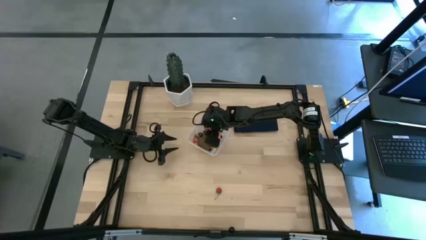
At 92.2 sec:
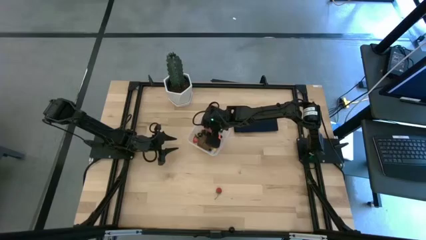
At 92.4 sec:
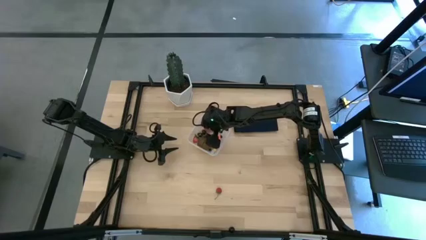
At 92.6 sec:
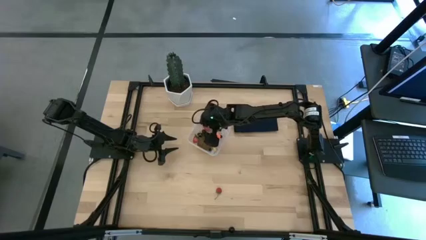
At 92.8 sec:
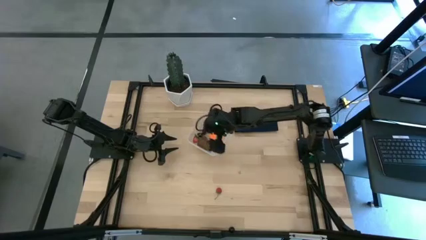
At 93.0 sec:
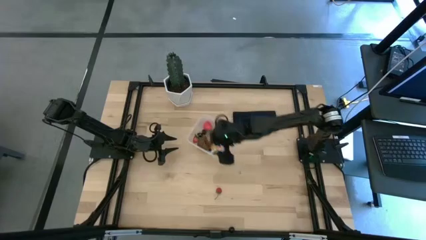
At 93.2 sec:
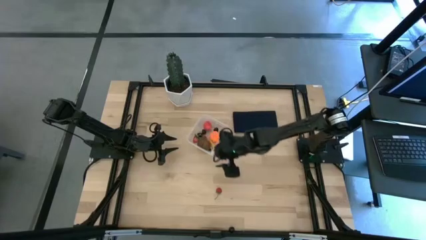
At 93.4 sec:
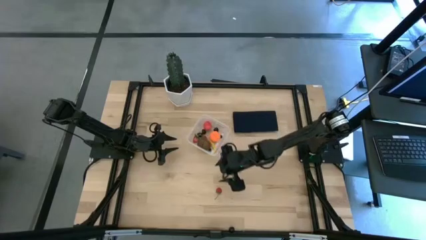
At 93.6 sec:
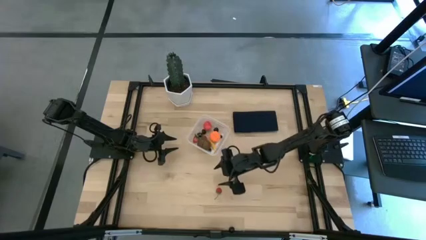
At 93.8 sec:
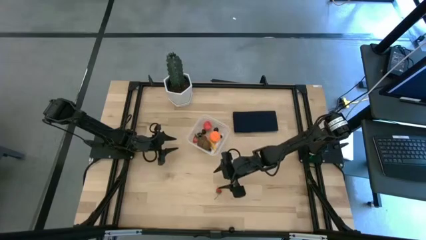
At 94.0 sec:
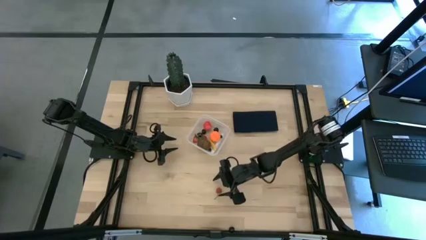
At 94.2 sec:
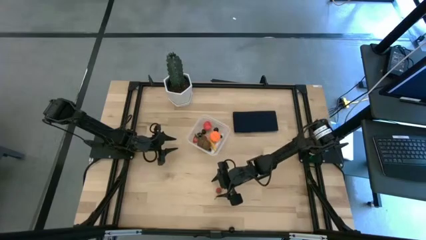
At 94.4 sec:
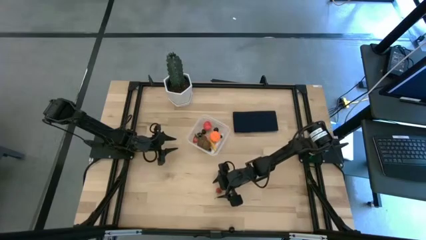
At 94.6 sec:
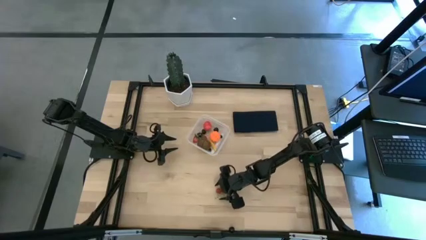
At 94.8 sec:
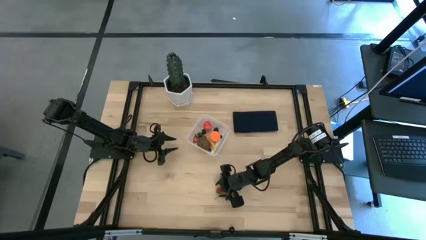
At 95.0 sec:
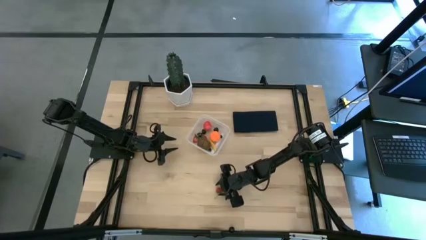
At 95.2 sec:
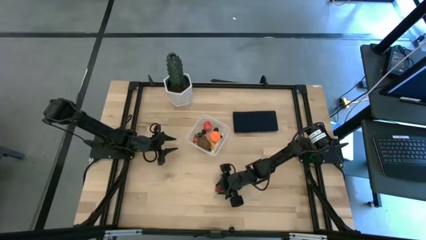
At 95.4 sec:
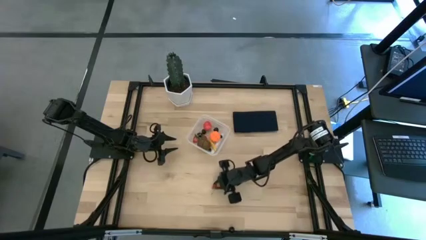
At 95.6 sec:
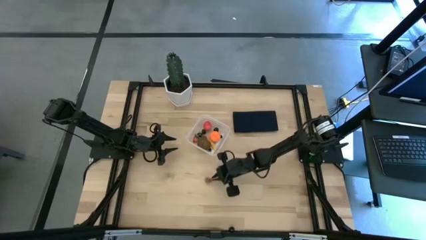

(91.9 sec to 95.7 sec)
Task: Pick and placing Produce into tupperware
Put the red strawberry into the transparent container

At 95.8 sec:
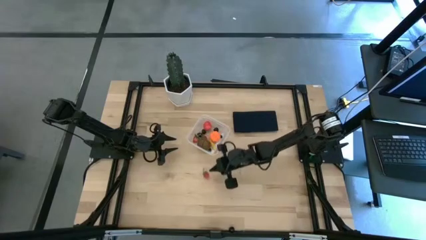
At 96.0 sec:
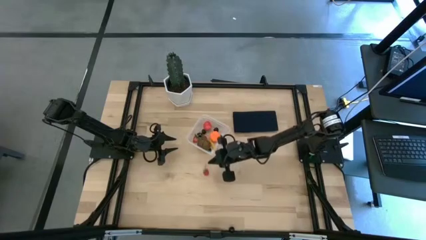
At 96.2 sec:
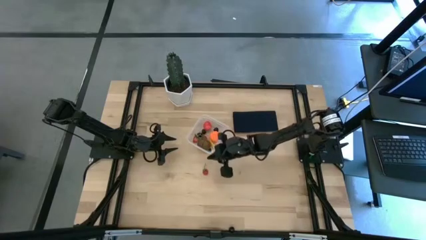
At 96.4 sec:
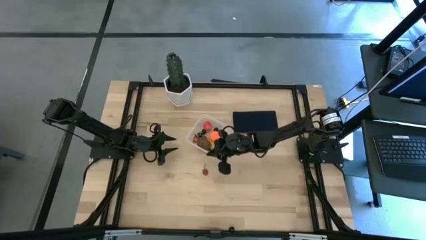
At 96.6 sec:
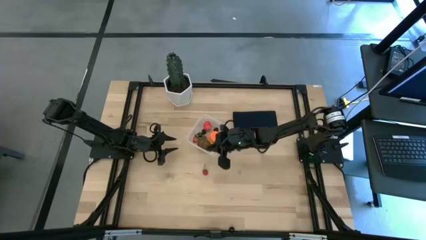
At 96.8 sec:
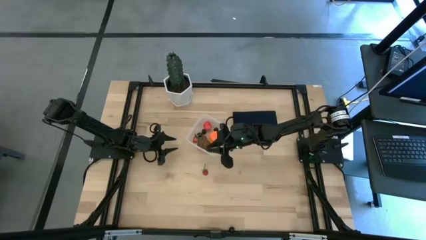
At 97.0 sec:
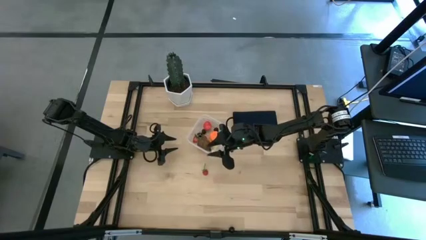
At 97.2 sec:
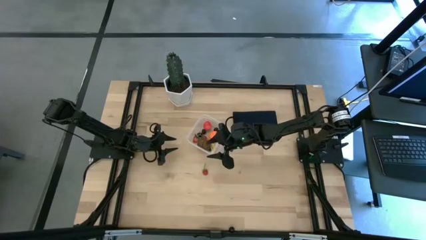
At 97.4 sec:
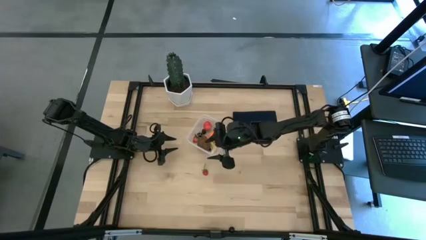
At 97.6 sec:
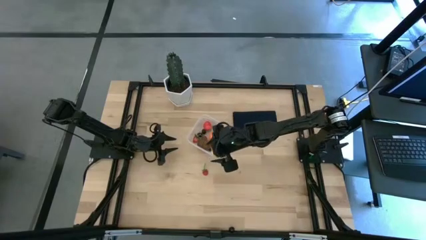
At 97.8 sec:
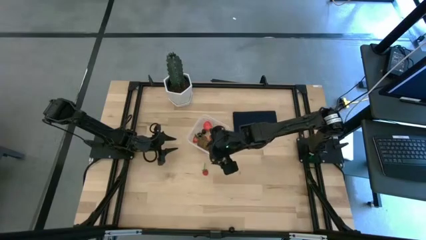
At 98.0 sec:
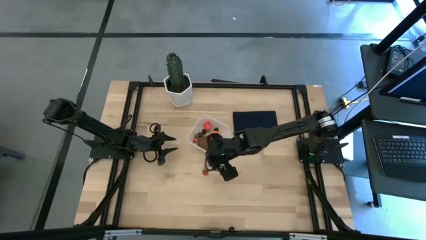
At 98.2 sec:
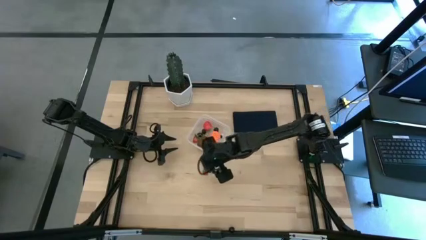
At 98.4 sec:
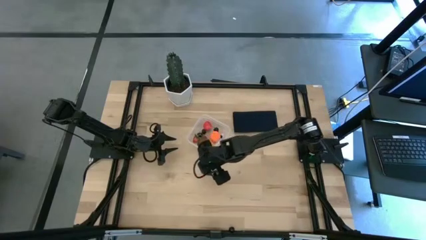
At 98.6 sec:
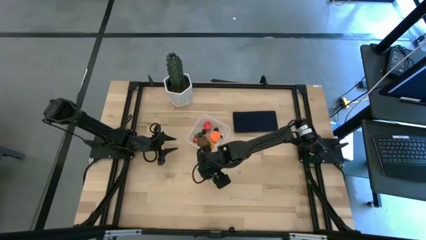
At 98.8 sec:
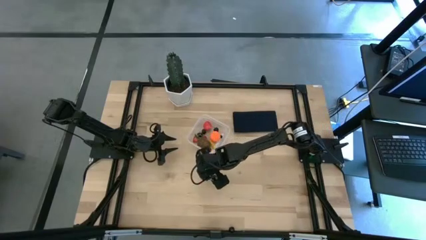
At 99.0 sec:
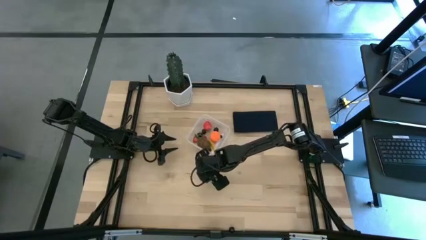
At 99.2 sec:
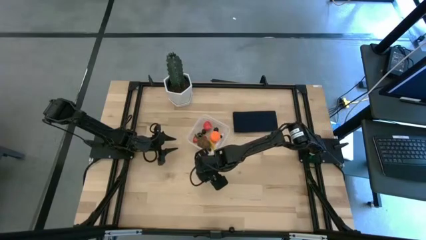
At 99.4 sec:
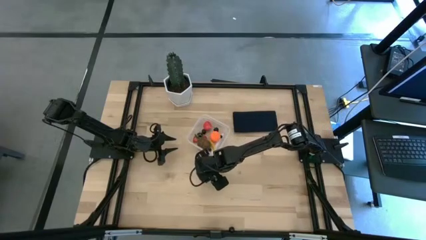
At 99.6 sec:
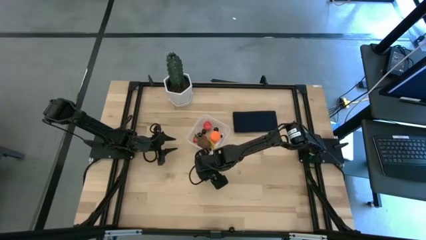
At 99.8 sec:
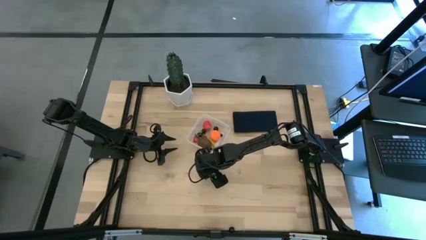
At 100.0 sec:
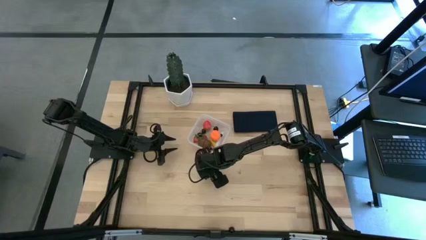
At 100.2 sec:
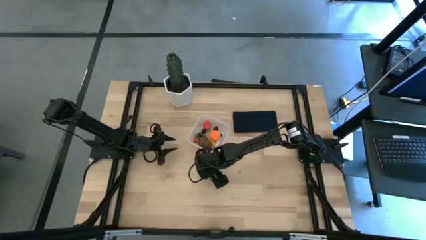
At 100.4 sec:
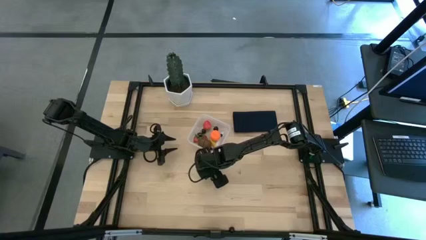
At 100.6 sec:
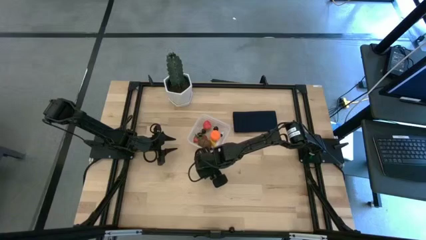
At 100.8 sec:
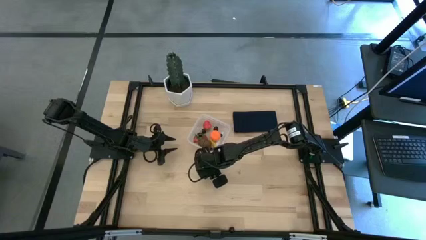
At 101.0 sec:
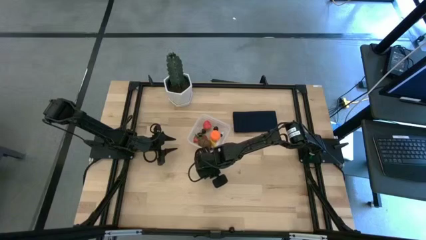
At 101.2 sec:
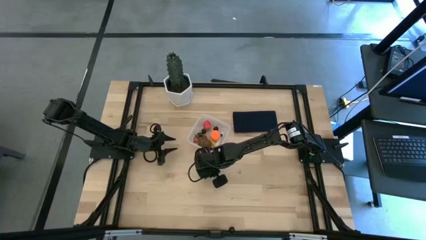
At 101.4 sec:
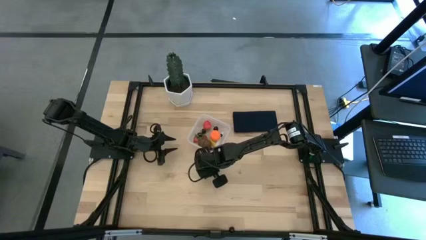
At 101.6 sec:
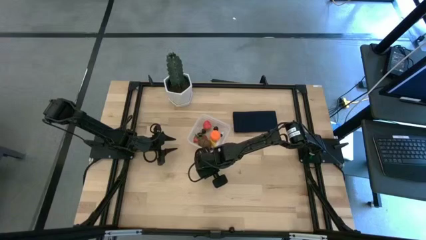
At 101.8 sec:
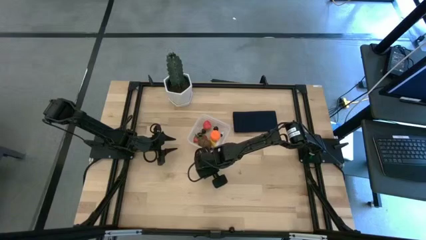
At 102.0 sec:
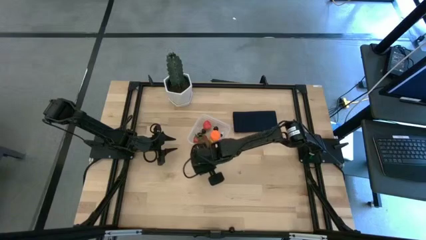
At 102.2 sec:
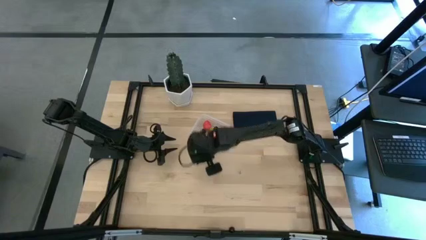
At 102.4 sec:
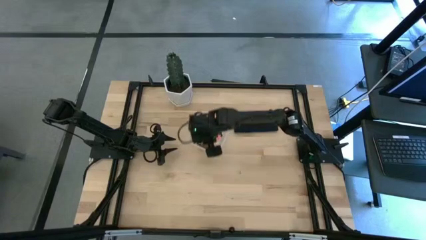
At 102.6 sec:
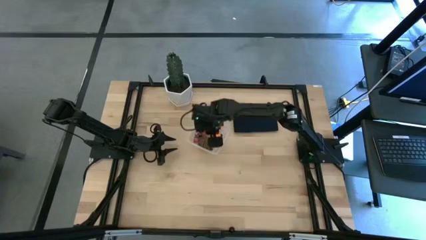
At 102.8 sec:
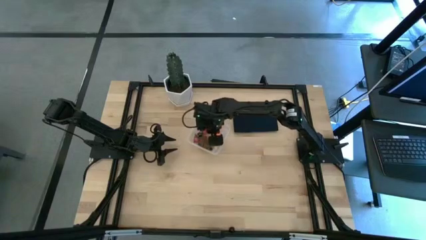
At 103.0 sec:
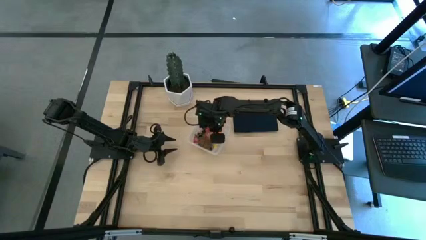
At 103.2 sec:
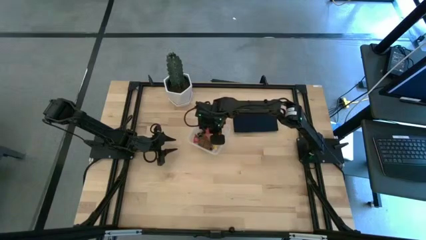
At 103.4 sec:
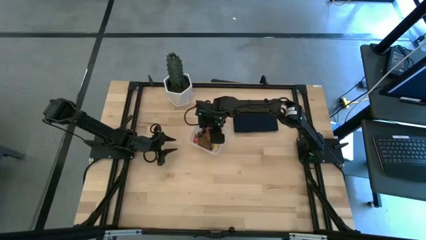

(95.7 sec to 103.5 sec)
Put the red strawberry into the transparent container

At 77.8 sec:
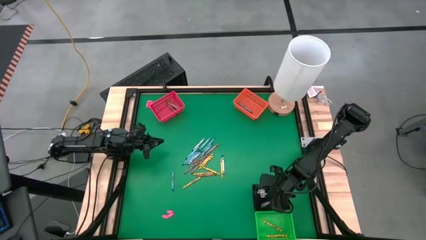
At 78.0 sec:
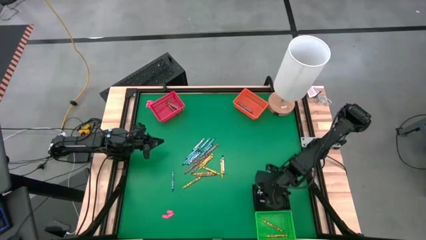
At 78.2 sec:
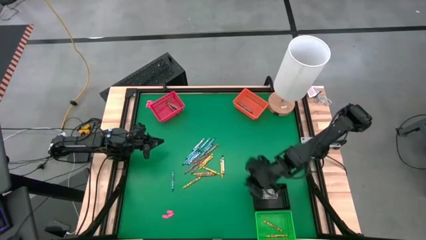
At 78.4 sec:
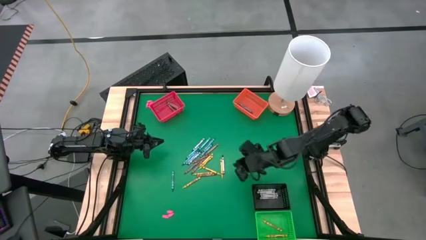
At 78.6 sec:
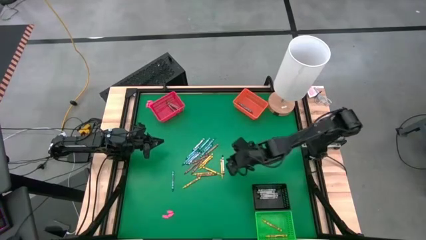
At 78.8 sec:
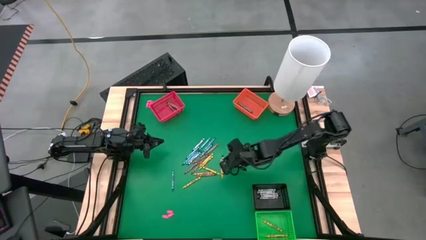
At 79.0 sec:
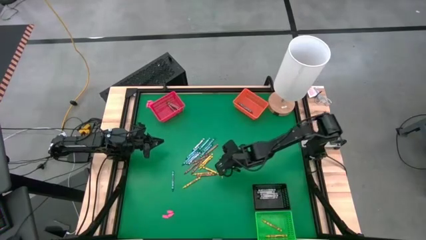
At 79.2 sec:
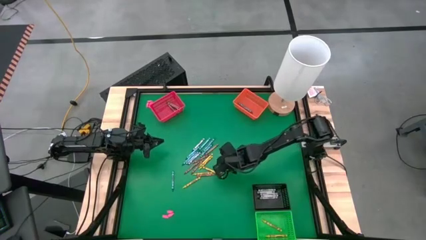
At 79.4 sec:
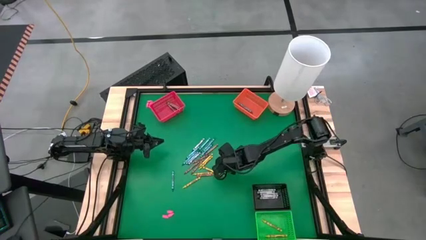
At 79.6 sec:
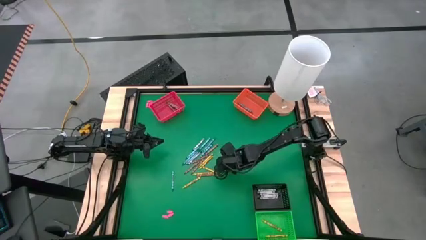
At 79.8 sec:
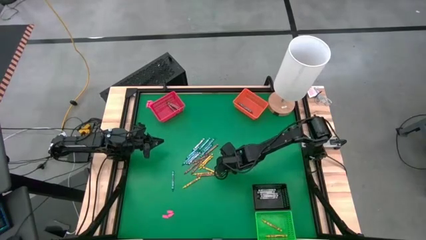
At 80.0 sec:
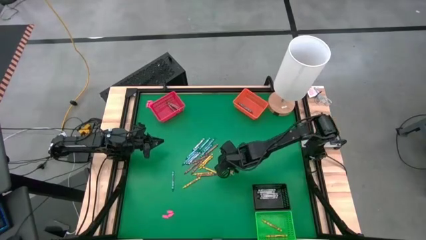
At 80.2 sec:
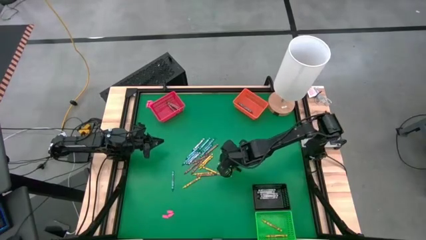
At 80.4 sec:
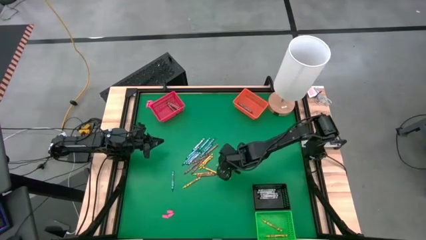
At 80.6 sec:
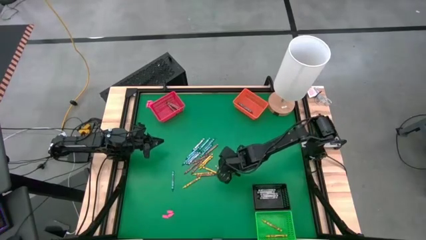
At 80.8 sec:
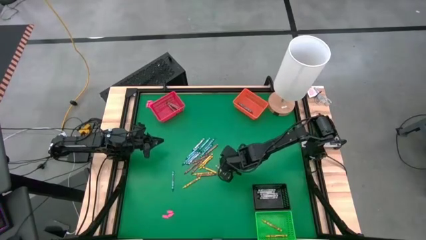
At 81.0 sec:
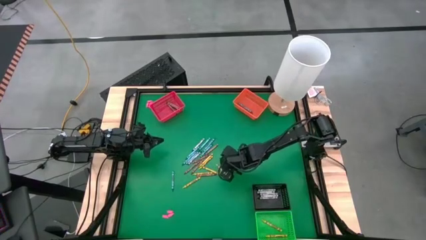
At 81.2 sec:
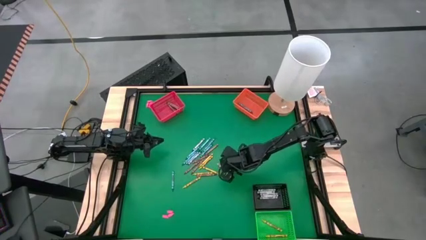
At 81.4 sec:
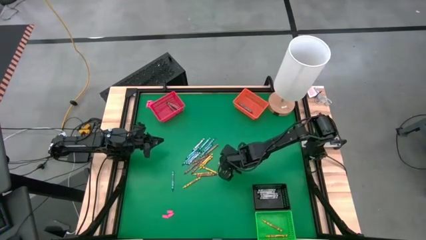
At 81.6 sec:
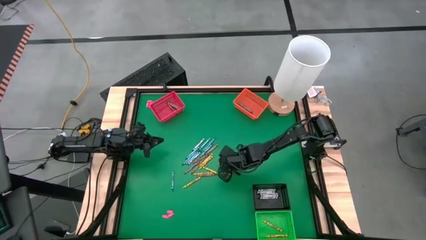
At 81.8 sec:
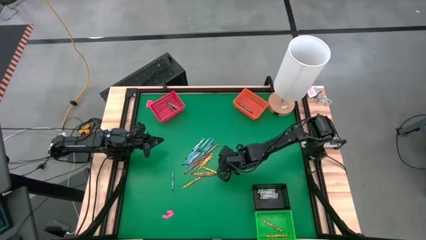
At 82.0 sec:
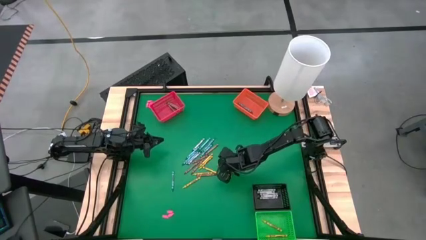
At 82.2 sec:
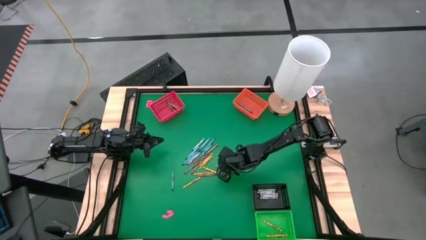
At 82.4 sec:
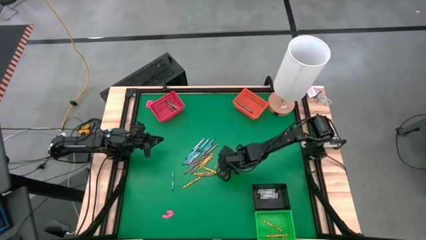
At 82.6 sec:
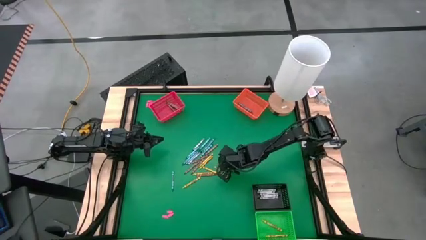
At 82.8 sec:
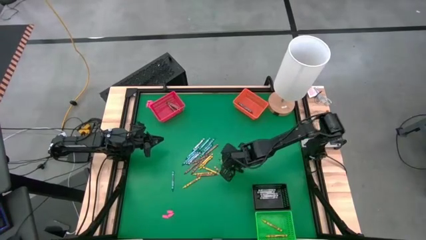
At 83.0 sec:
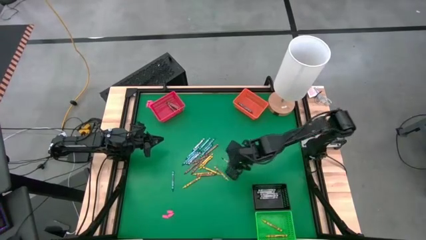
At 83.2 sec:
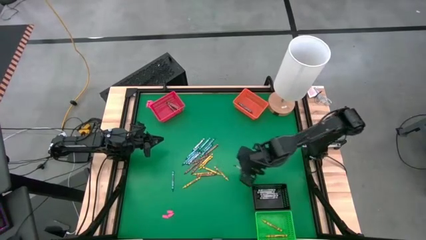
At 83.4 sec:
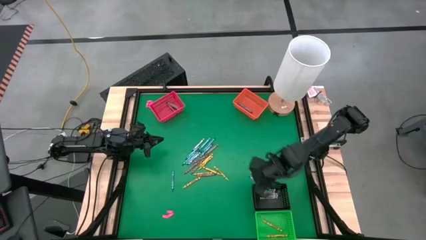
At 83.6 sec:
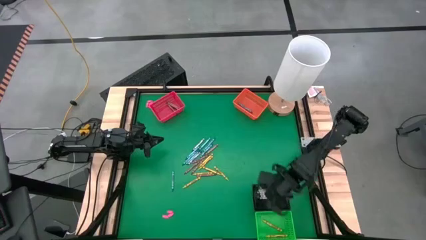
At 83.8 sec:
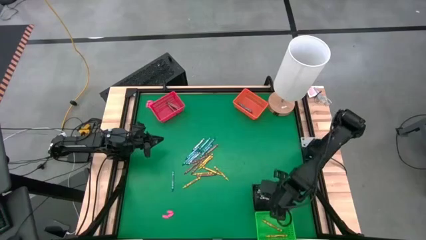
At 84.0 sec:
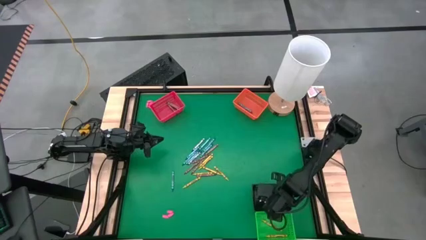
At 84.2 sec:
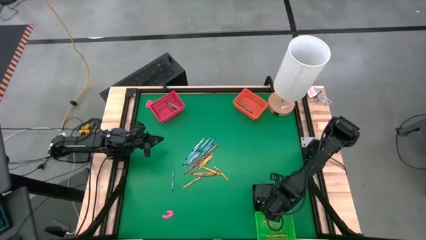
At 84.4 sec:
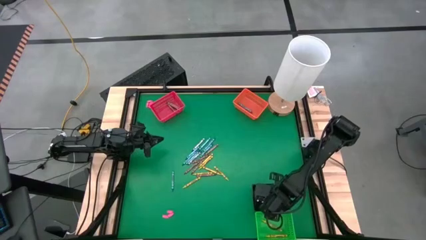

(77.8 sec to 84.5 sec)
Task: Sort crayons
Put the black crayon into the black bin
